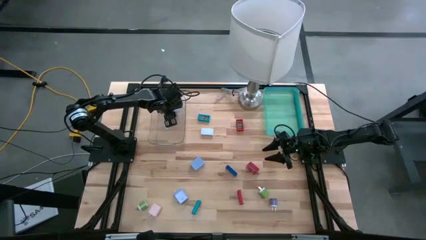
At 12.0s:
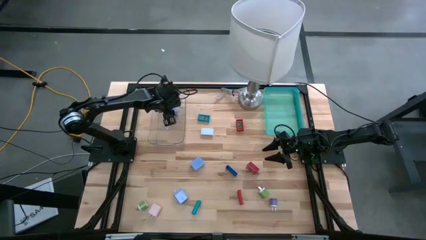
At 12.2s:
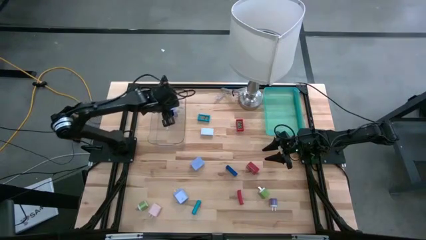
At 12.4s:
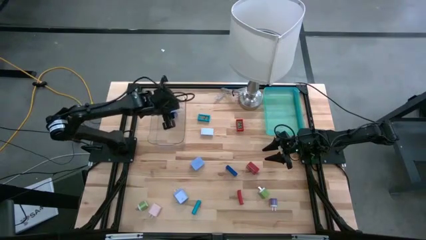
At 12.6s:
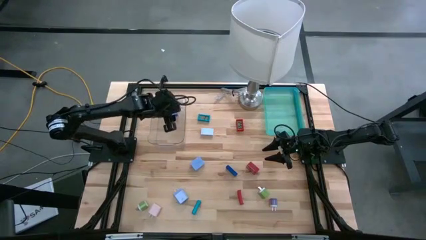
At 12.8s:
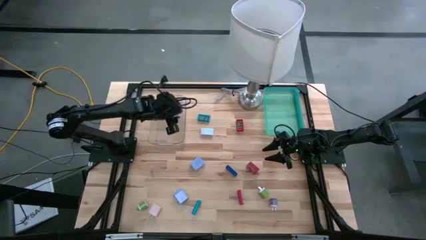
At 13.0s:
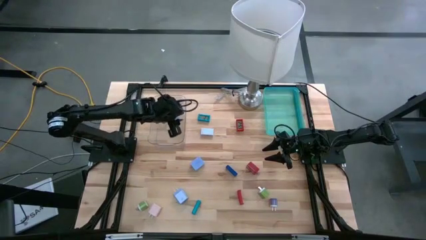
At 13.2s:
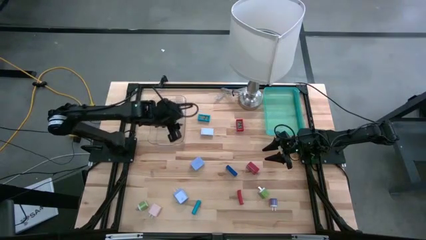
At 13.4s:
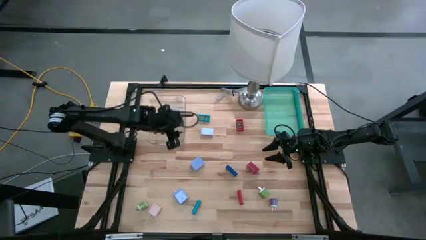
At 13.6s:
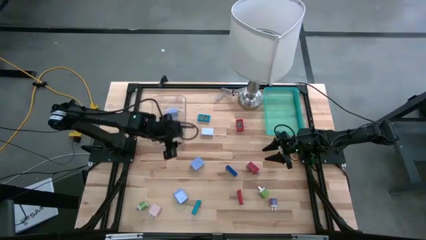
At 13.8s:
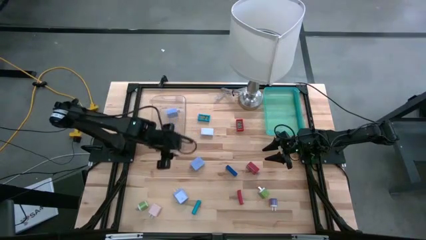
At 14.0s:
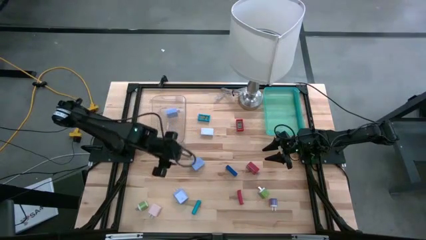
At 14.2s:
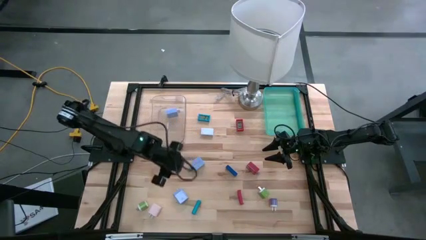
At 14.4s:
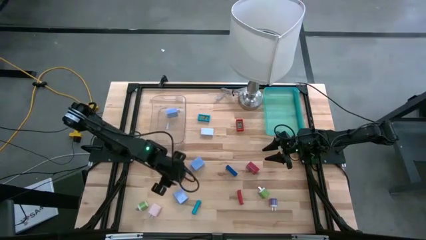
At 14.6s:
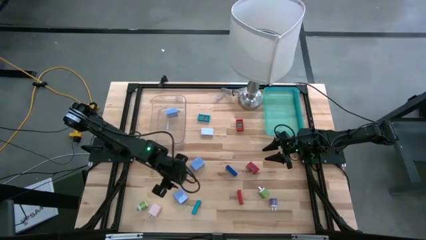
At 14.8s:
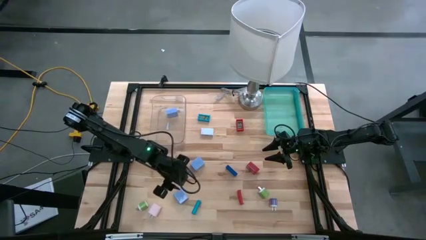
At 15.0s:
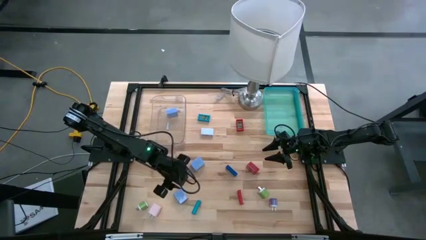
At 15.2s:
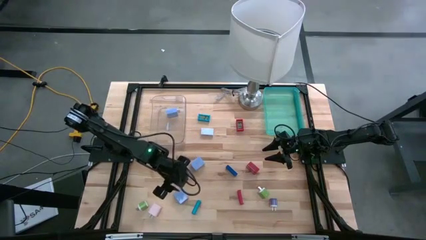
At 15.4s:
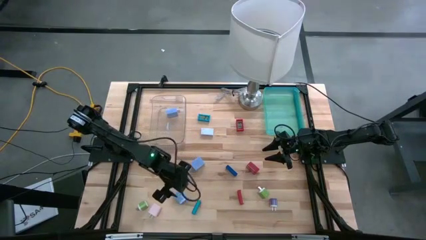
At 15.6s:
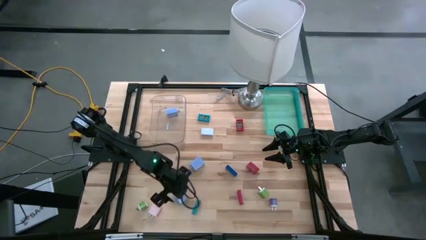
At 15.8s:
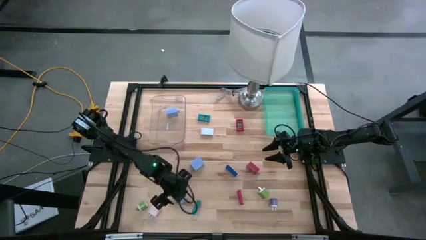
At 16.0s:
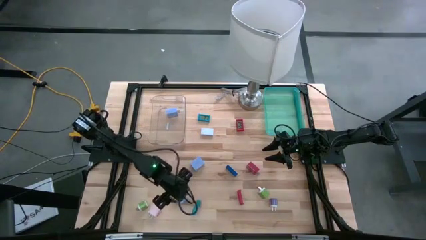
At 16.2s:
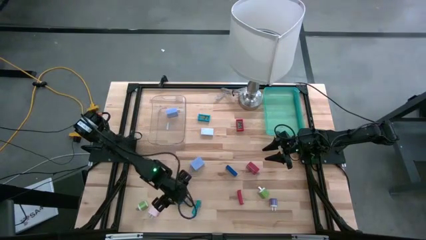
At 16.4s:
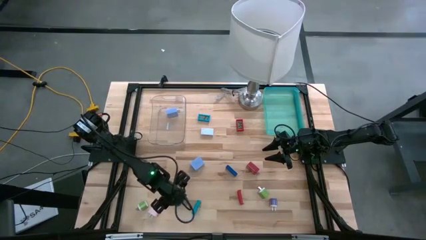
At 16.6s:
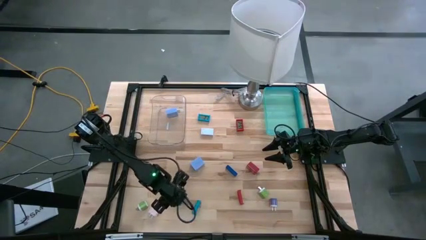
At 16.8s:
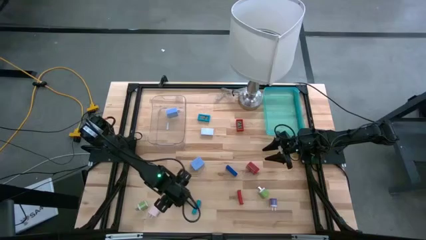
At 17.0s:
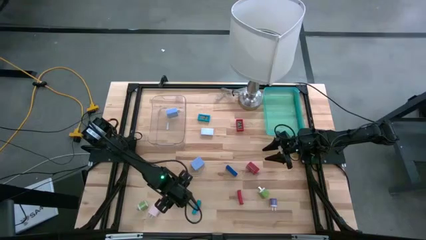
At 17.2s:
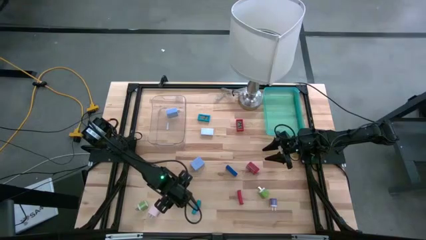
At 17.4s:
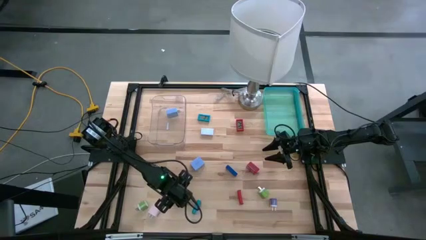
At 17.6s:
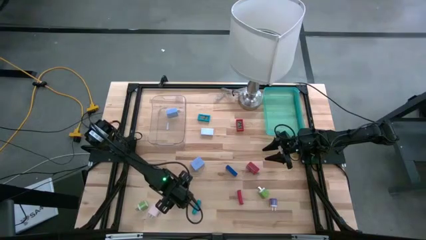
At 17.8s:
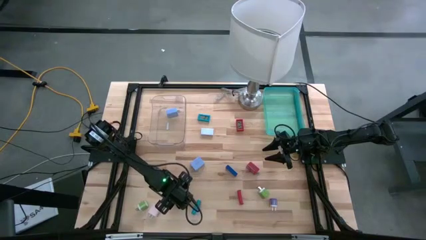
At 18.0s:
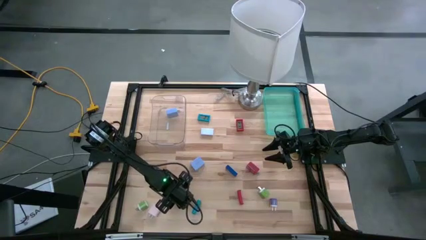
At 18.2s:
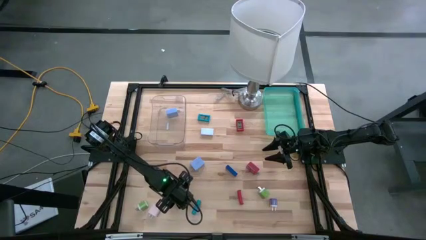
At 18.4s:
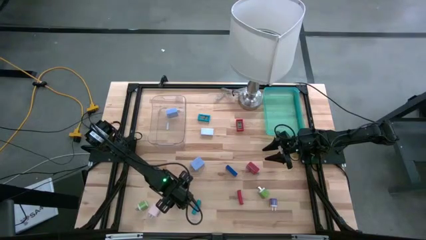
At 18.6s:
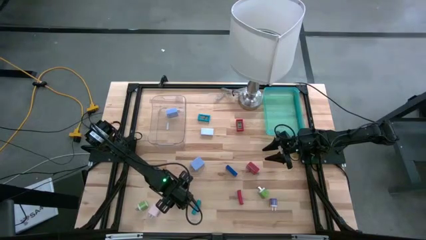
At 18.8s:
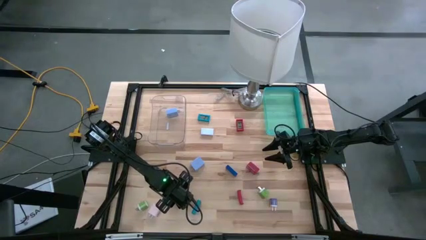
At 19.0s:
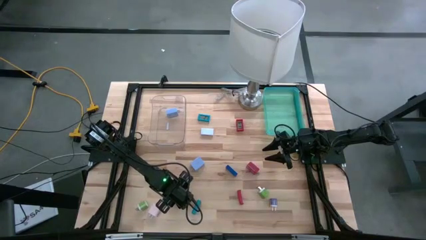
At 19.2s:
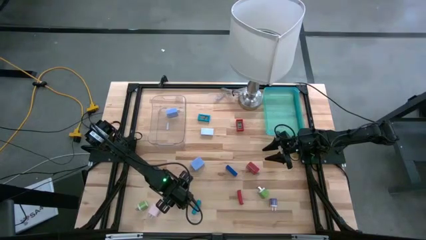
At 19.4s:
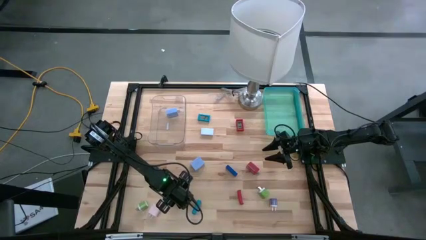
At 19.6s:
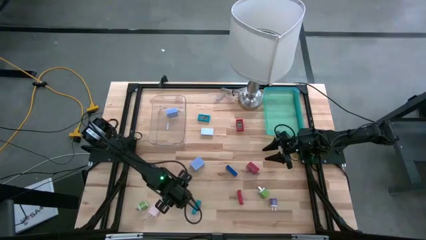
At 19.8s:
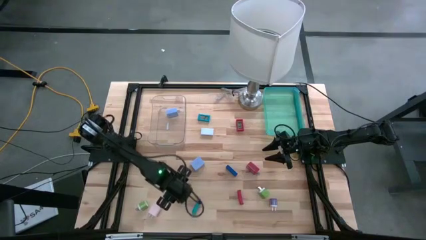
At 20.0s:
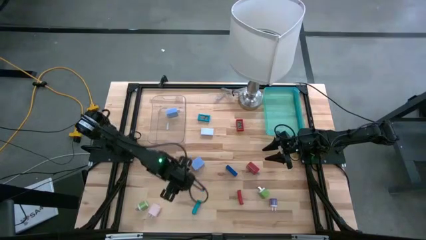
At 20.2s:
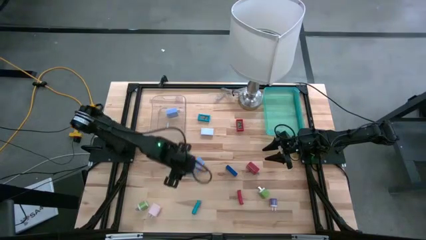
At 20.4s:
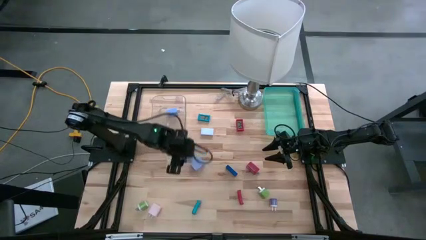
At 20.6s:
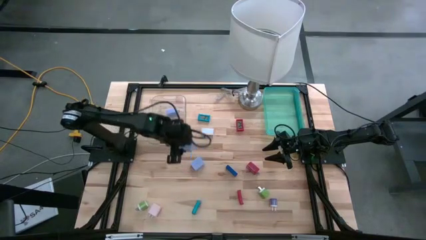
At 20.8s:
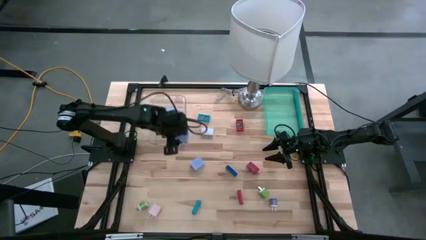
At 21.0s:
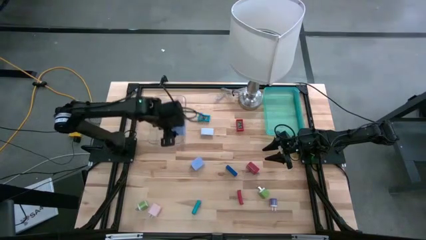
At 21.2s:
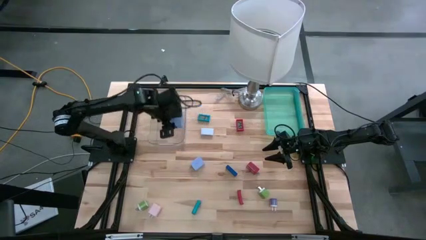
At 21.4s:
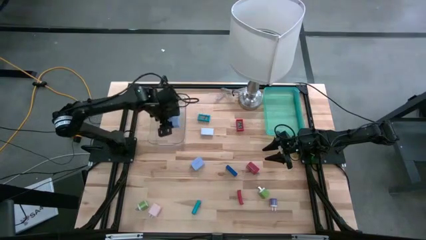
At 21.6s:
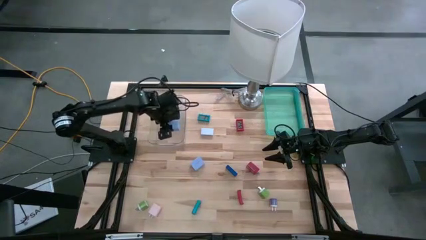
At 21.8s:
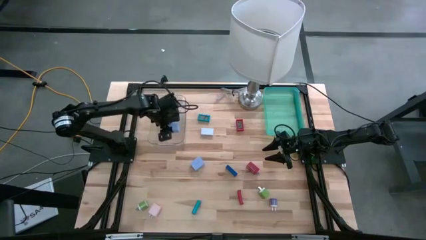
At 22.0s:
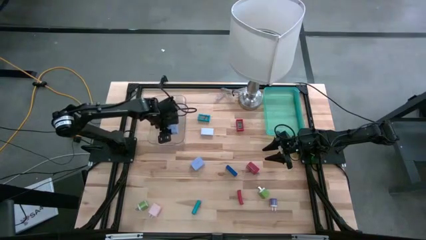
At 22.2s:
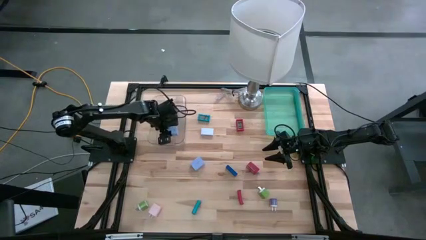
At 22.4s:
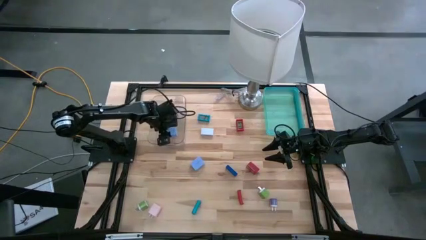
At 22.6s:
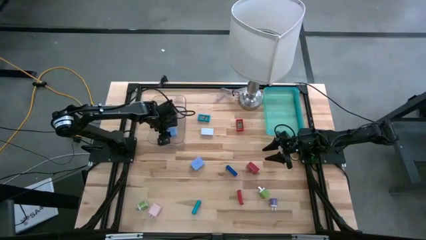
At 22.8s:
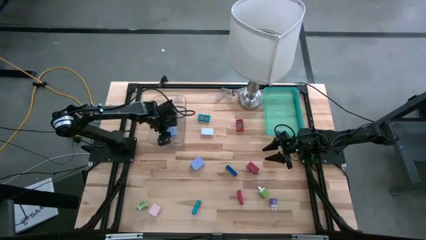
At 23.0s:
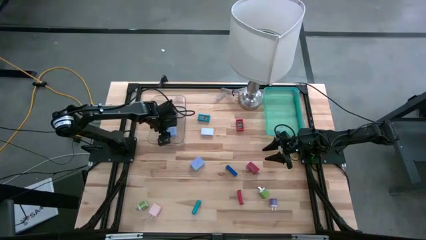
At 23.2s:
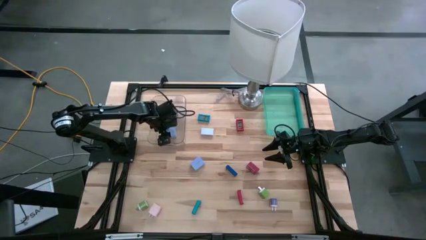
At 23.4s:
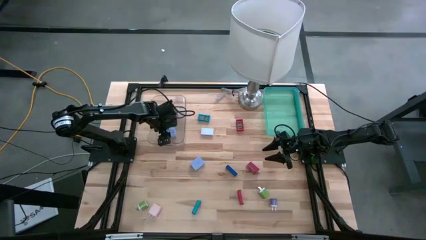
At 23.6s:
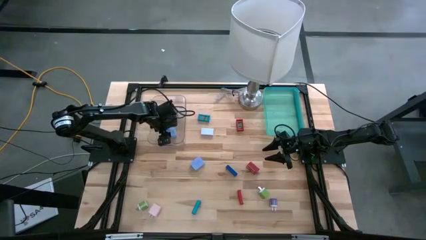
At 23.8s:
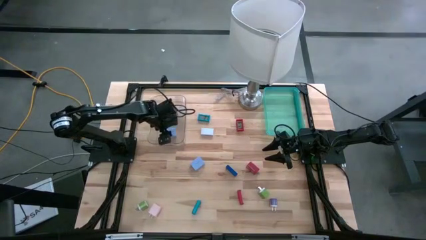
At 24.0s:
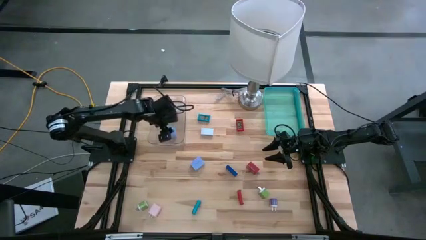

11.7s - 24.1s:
Task: Pick & Place Office items
Put the bottom left blue charger adapter into the transparent bin

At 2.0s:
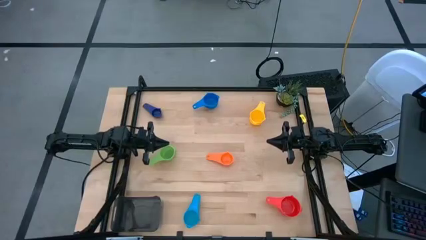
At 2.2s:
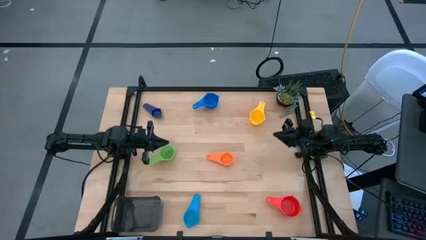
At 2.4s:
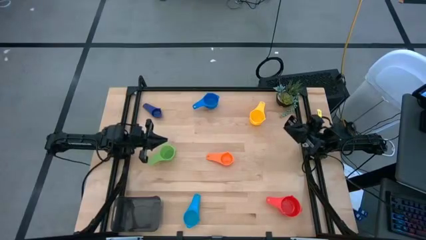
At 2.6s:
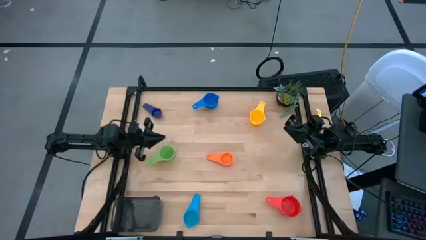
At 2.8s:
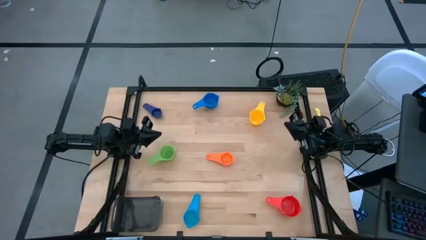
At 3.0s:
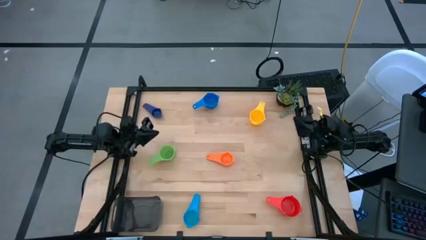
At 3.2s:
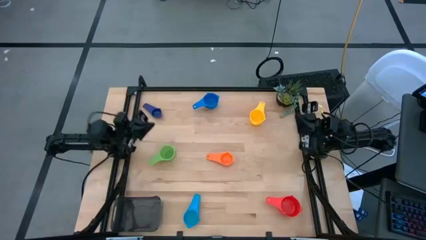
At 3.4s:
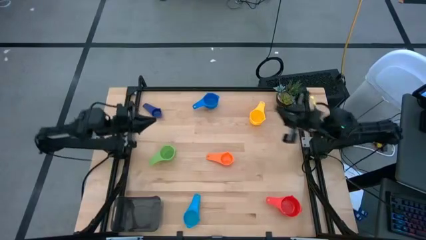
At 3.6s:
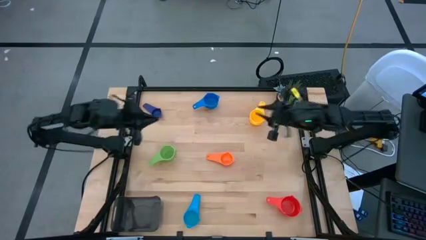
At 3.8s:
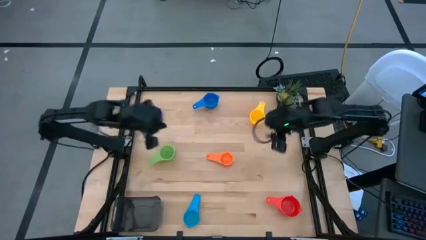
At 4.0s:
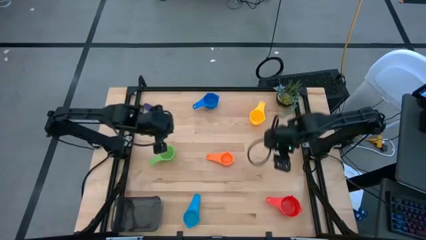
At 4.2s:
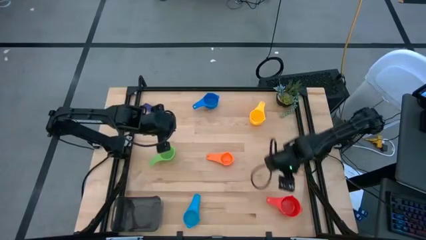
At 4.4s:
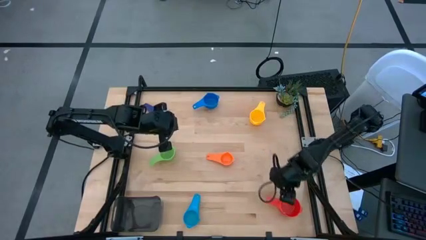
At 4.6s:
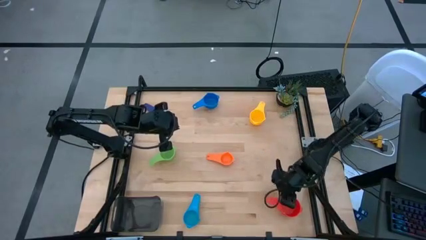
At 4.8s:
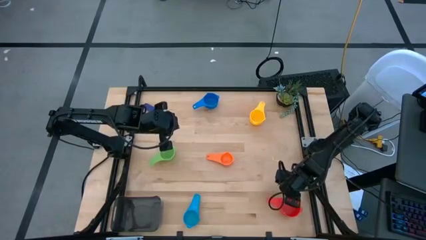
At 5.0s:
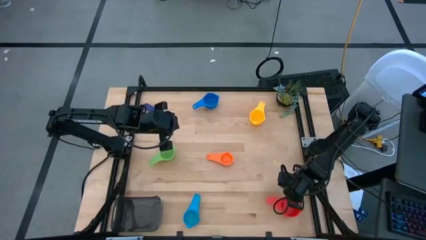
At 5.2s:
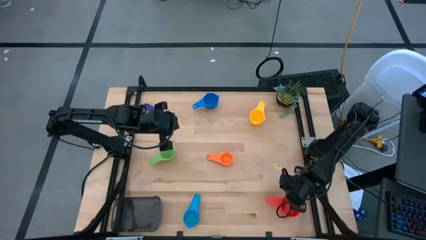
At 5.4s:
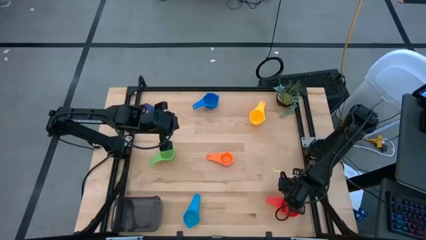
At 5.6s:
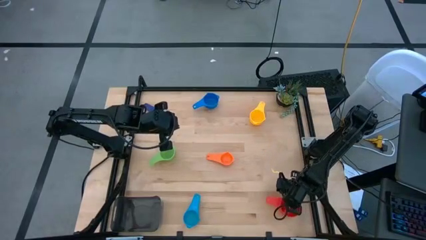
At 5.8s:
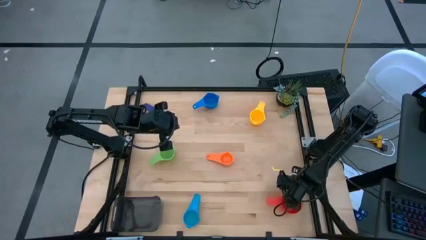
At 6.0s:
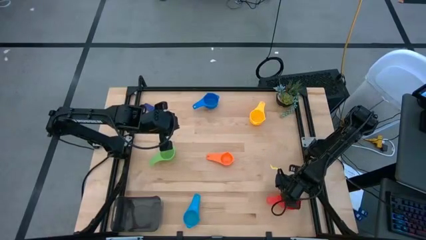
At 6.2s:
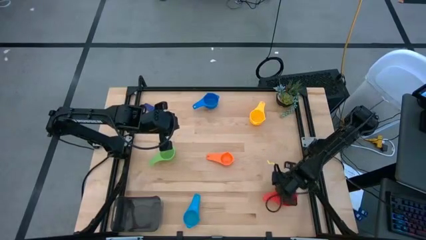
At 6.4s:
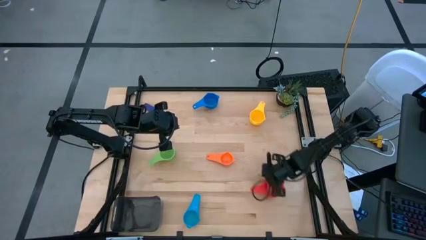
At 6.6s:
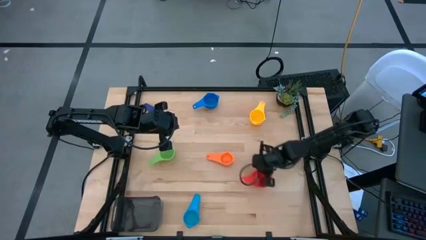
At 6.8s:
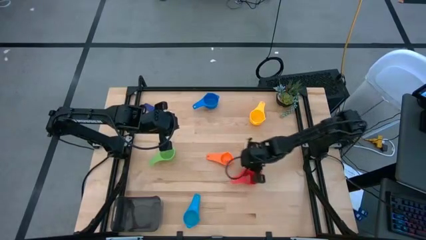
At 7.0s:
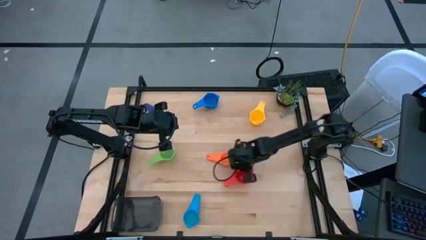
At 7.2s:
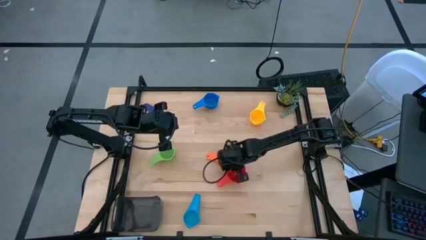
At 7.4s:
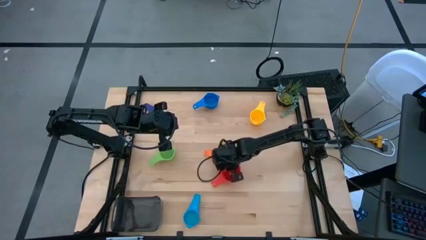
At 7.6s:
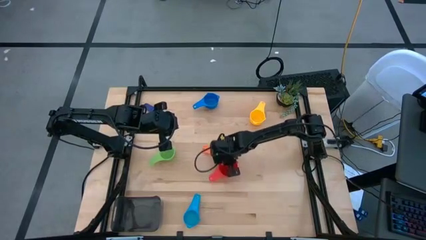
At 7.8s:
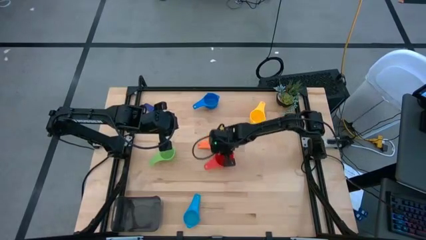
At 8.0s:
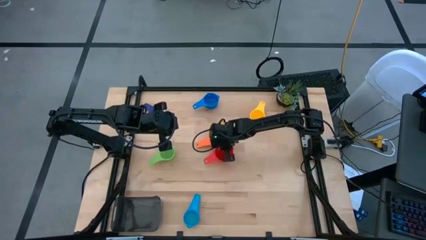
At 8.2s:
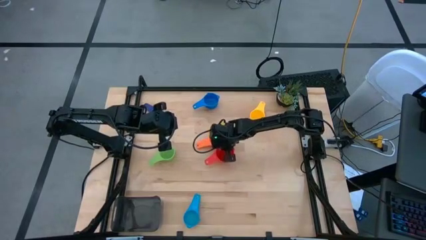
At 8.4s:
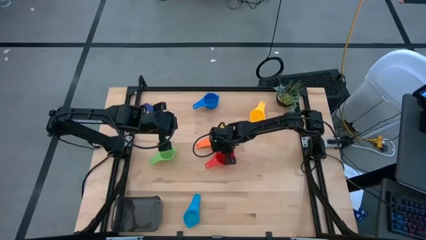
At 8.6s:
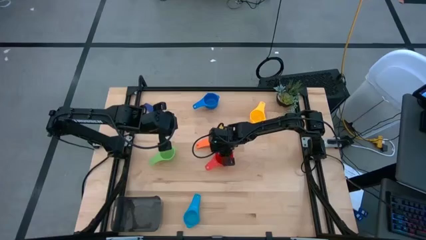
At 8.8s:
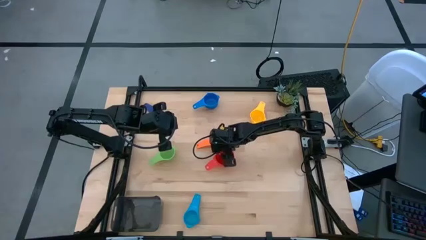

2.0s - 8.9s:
Task: Nest measuring cups in basket
Prepare the red measuring cup
